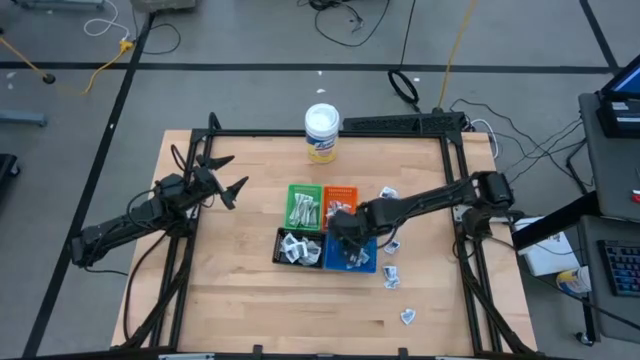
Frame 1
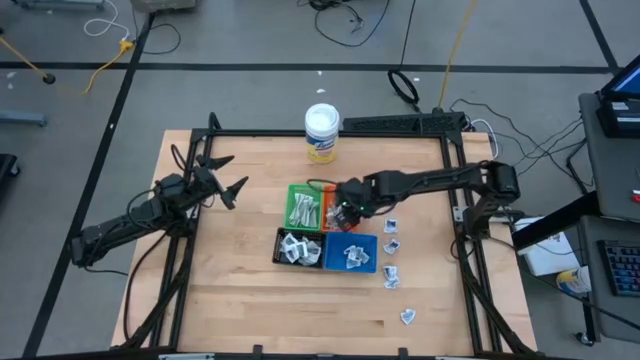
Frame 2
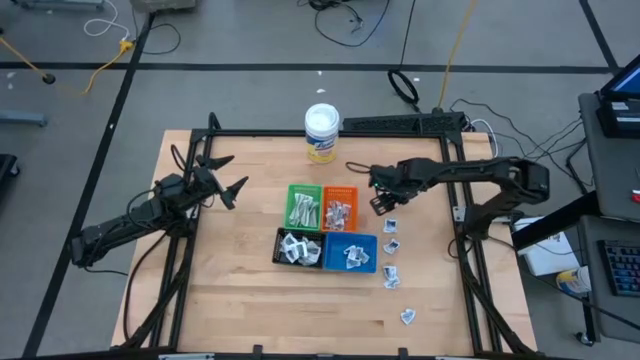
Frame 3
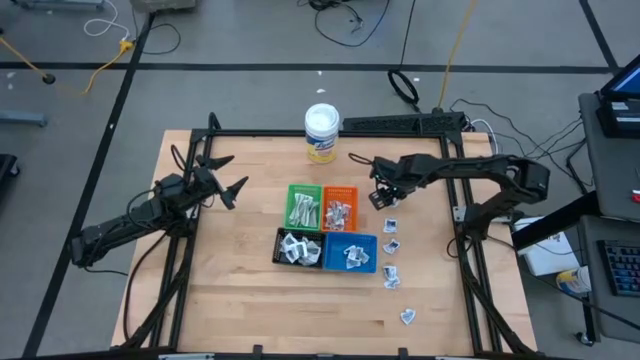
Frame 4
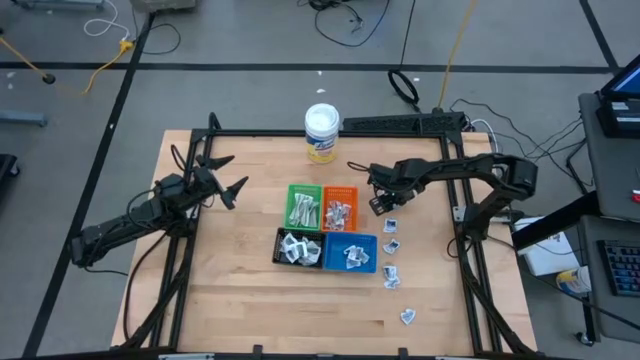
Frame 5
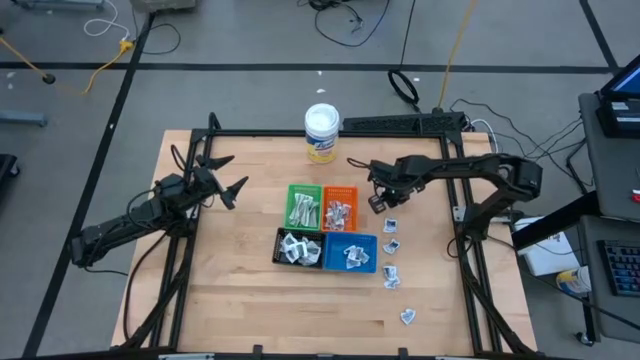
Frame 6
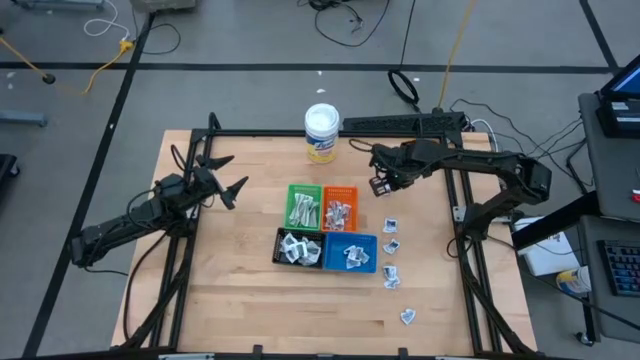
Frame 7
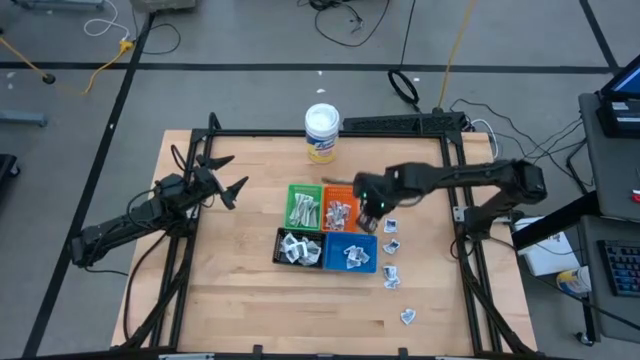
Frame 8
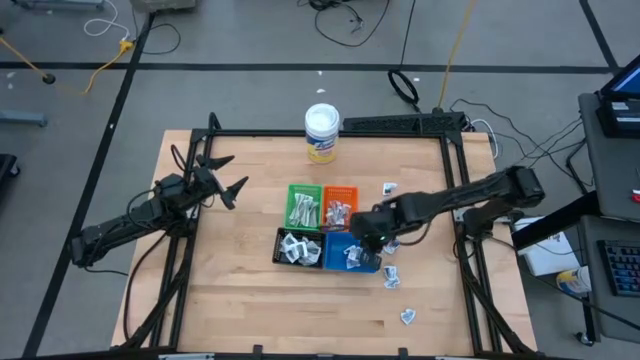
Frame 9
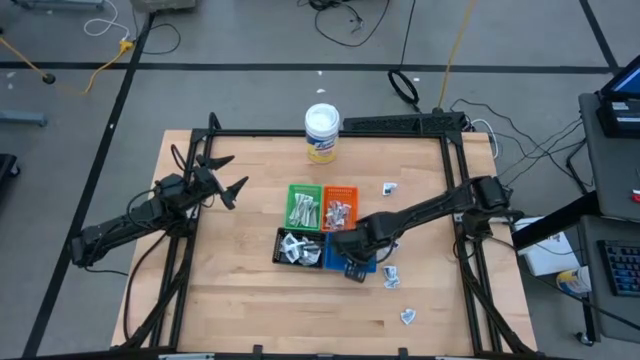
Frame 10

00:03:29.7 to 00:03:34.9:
Task: Pick & Place First Aid Supplies
Put the alcohol pad into the blue bin

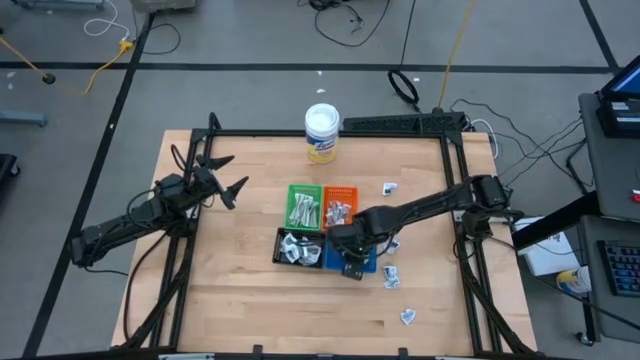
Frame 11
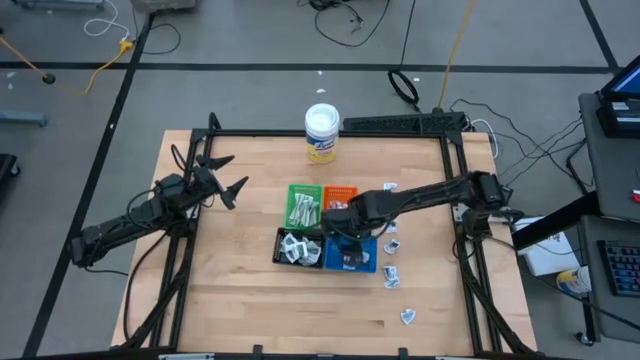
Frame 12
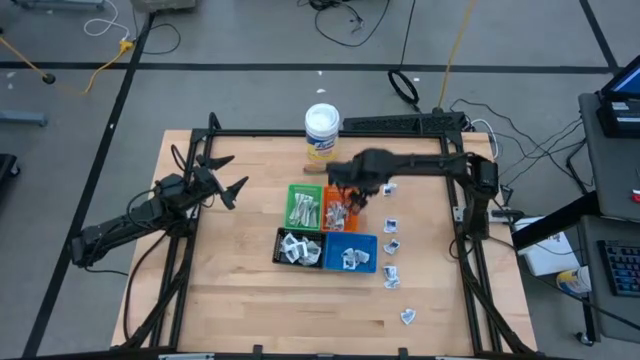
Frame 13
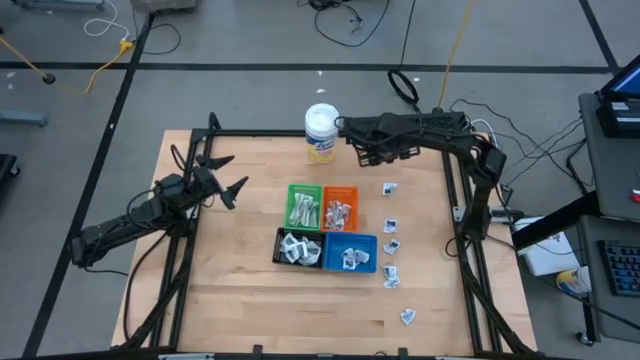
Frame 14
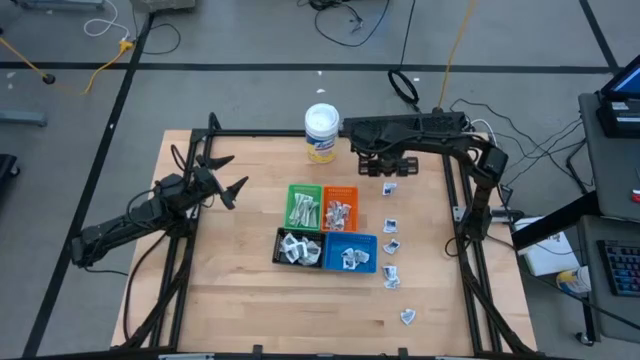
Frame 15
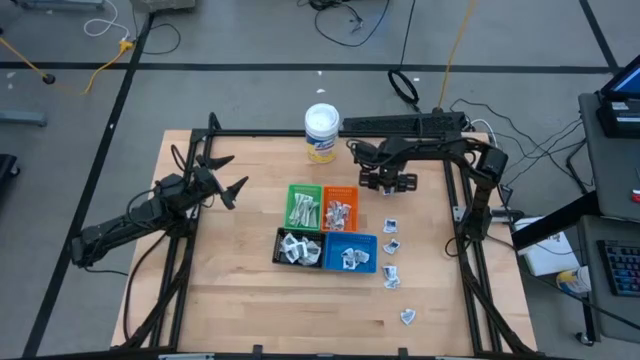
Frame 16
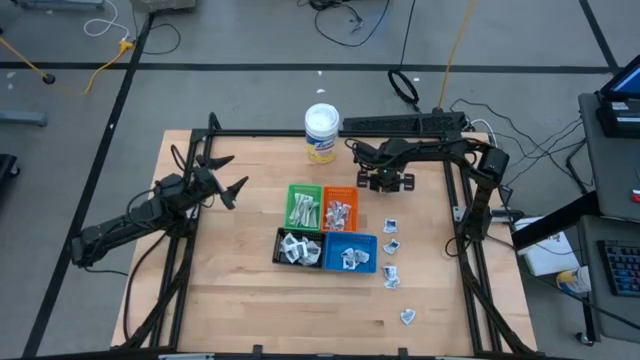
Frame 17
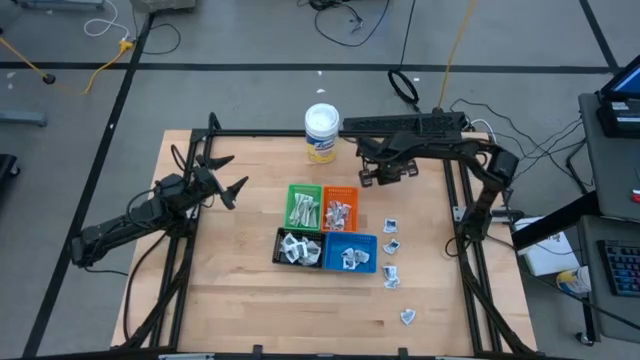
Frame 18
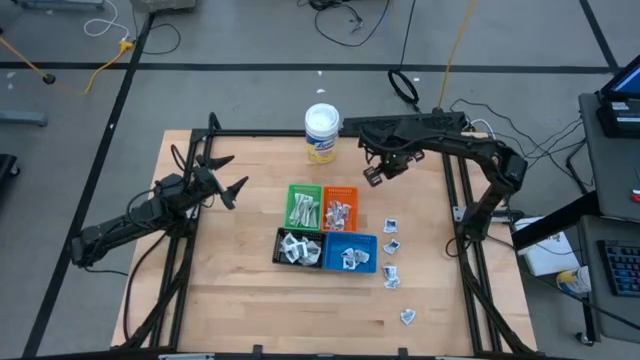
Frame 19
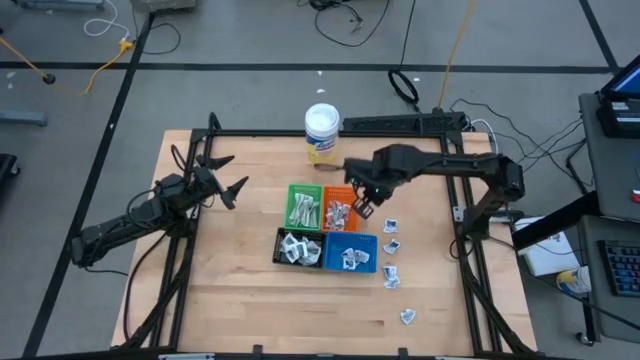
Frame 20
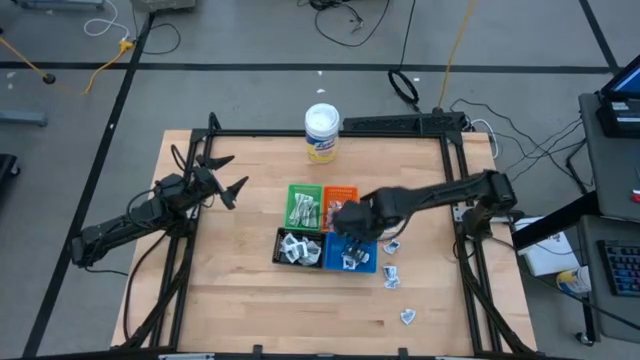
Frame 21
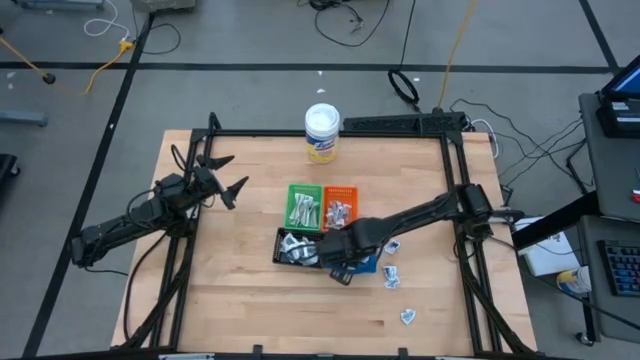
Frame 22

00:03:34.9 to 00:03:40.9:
Put the alcohol pad into the blue bin

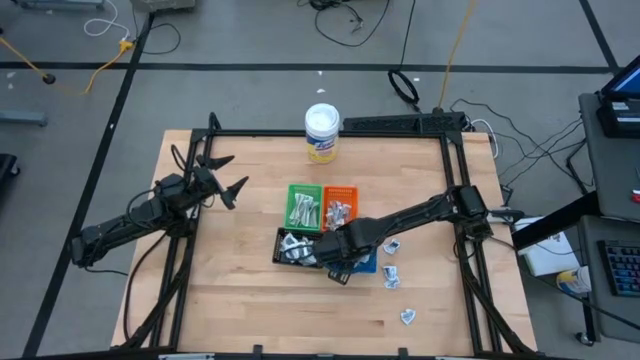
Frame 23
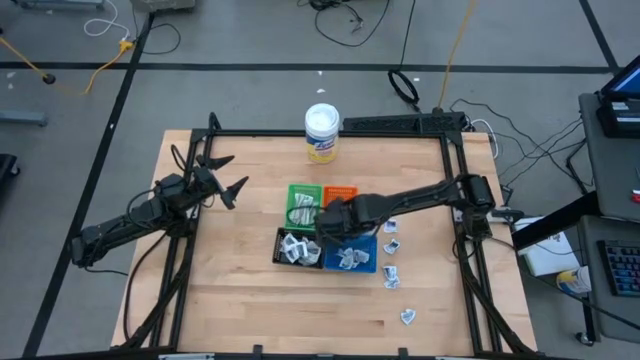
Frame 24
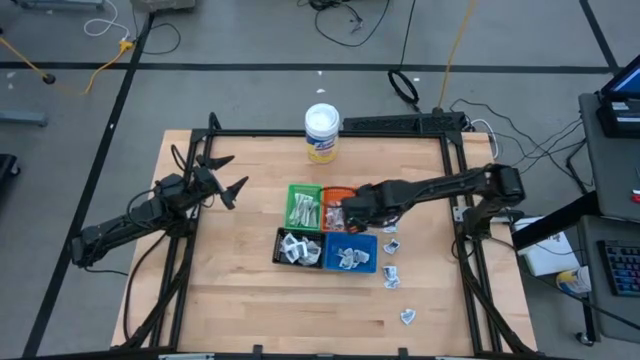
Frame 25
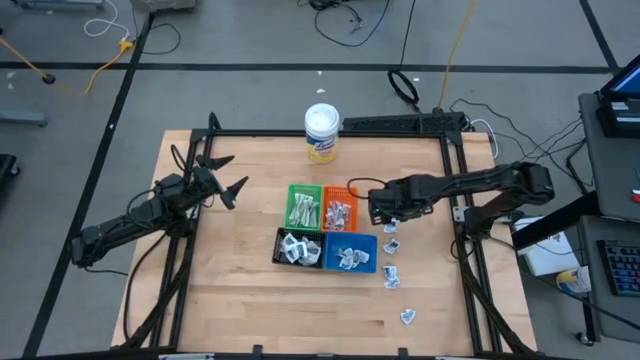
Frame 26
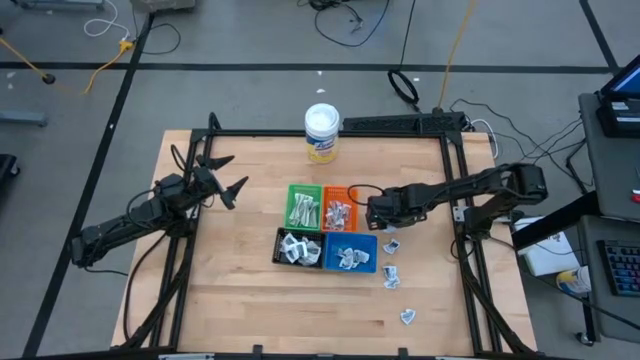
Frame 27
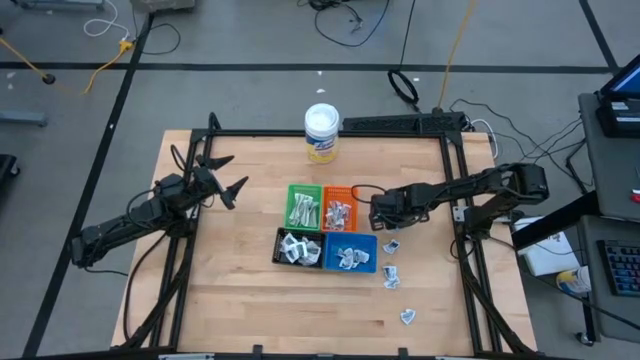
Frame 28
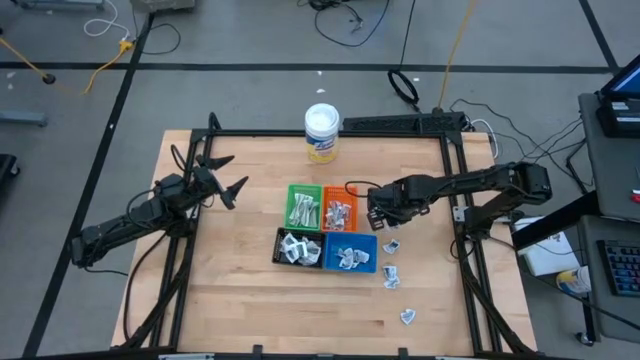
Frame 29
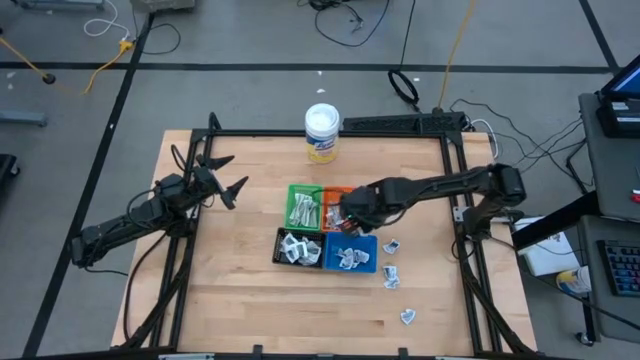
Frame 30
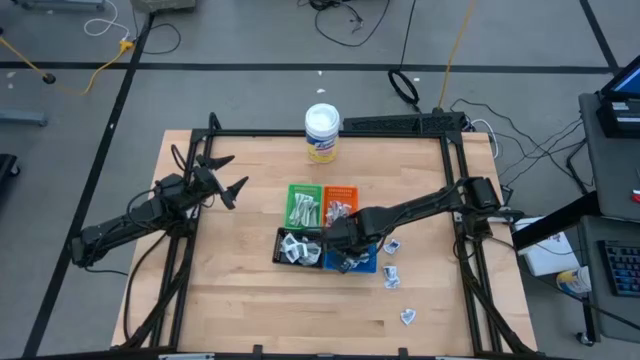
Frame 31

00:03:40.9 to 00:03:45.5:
Put the alcohol pad into the blue bin

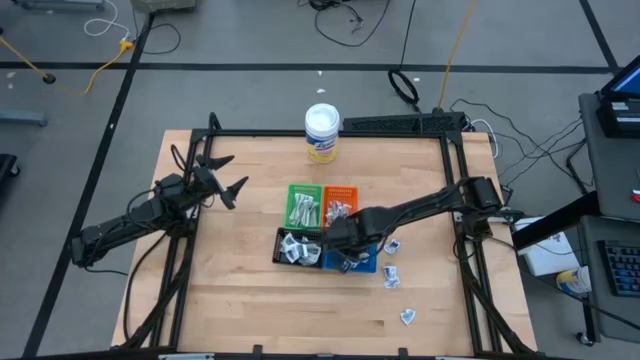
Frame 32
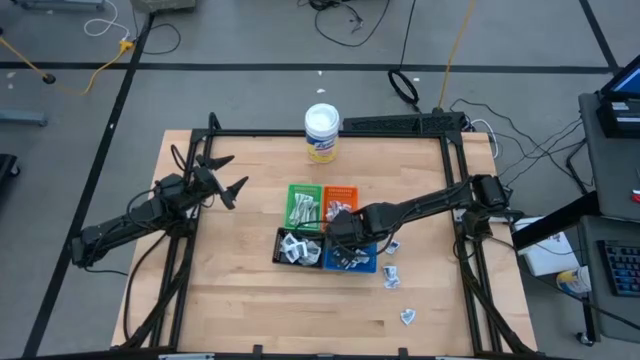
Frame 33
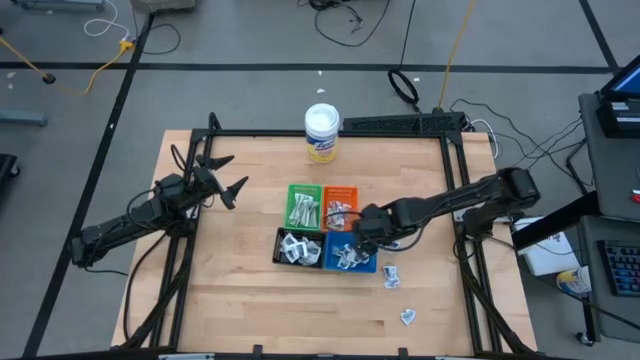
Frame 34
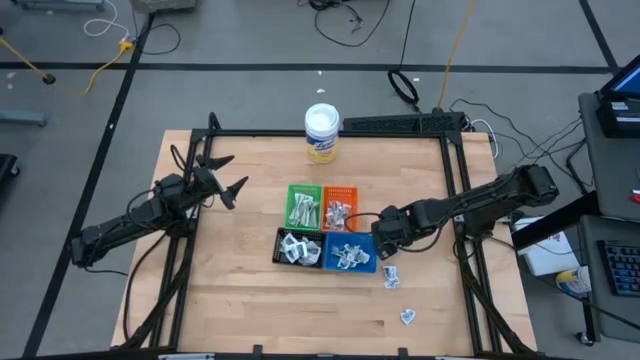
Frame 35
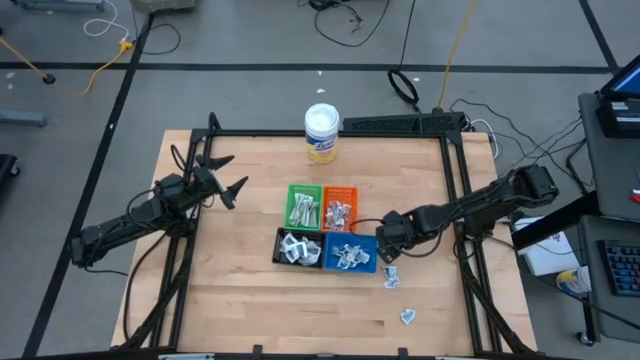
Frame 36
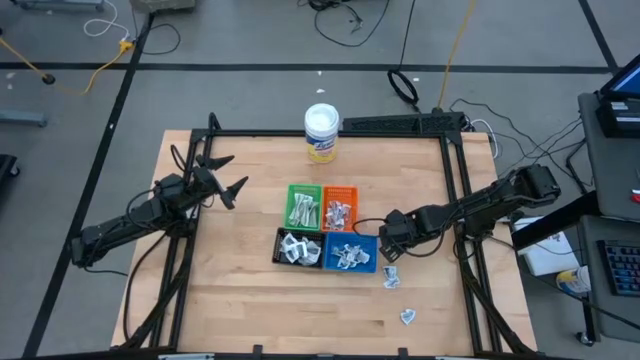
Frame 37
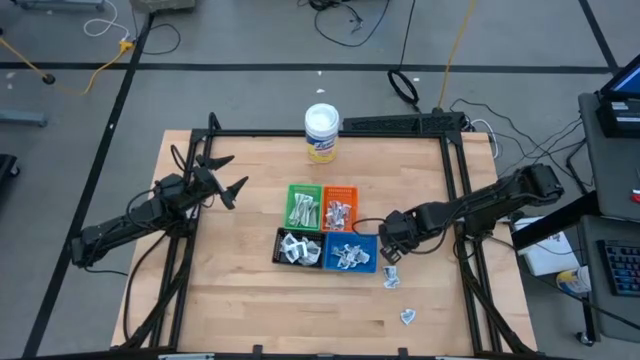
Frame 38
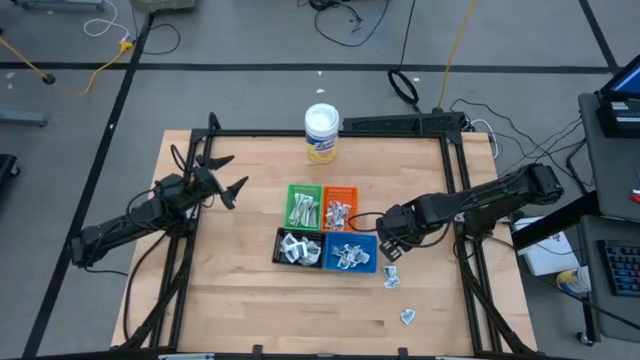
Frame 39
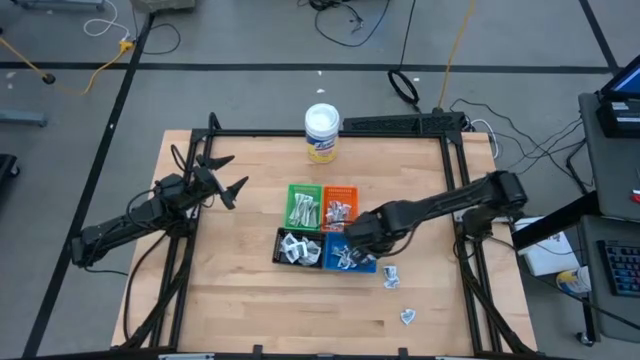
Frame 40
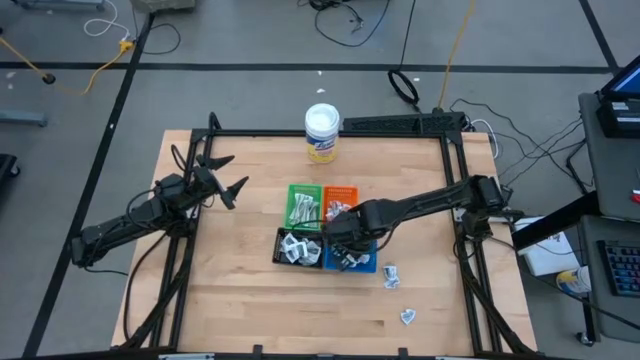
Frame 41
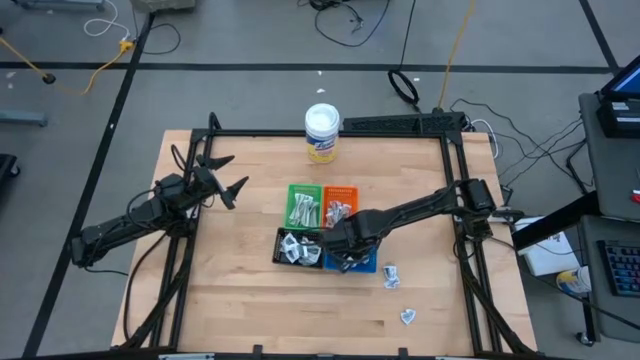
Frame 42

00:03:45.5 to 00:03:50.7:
Put the alcohol pad into the blue bin
